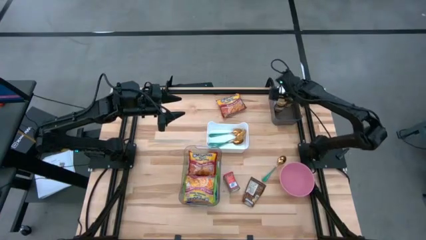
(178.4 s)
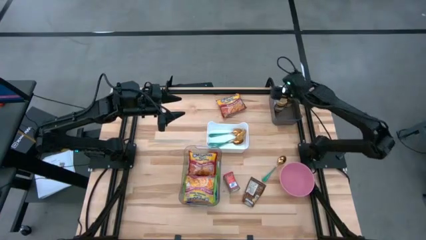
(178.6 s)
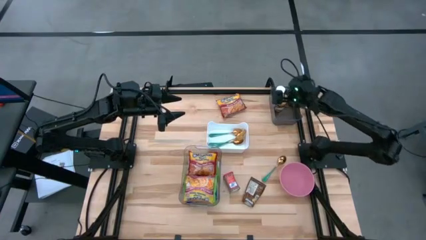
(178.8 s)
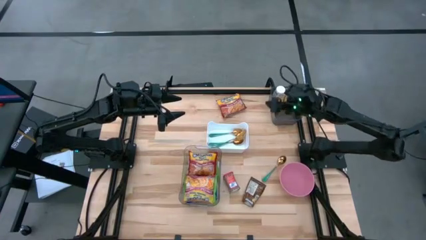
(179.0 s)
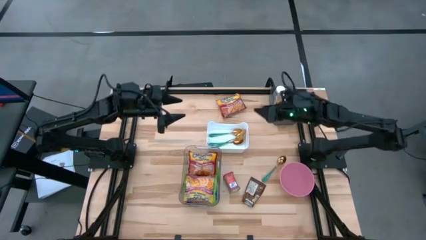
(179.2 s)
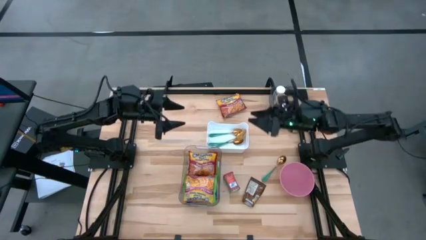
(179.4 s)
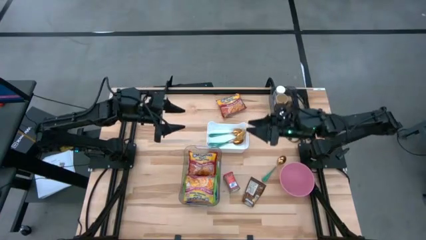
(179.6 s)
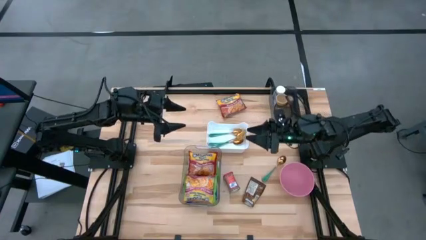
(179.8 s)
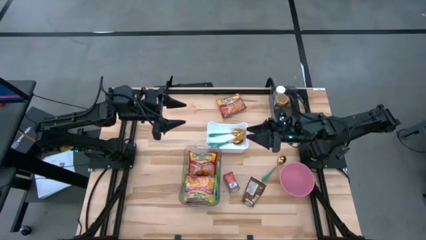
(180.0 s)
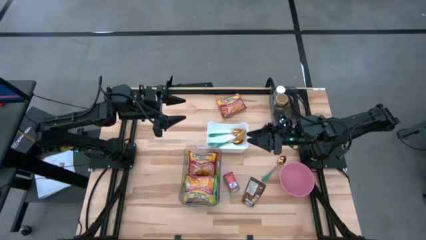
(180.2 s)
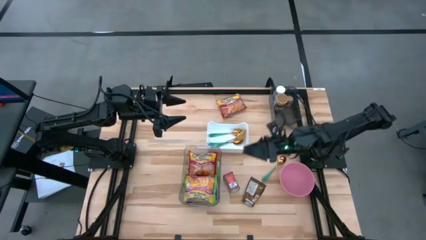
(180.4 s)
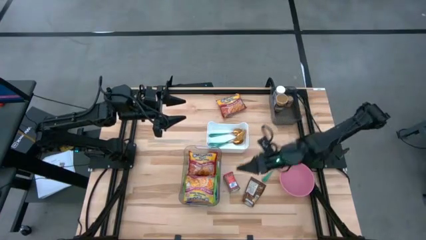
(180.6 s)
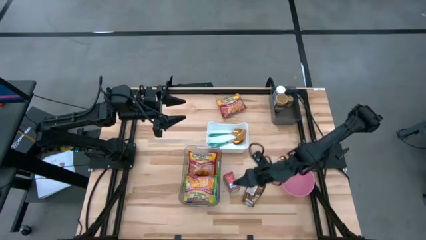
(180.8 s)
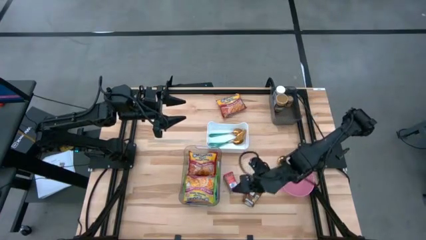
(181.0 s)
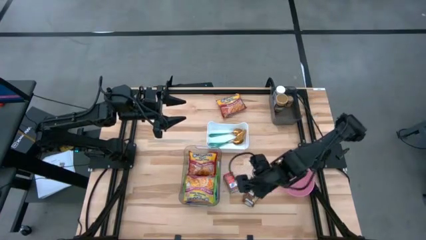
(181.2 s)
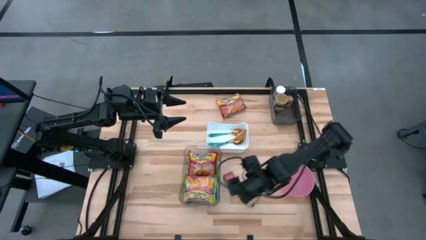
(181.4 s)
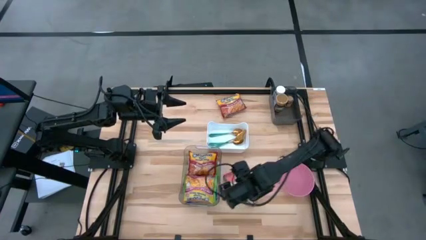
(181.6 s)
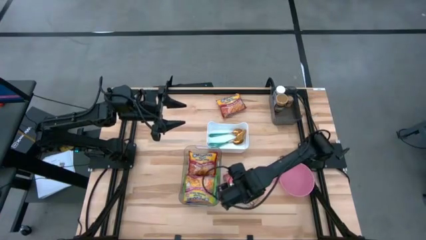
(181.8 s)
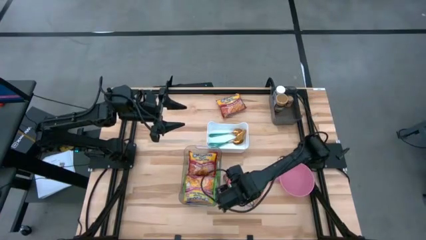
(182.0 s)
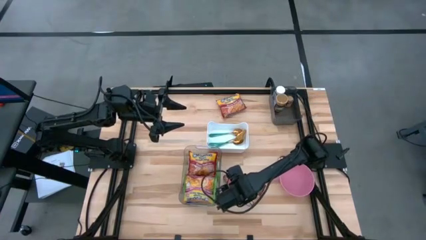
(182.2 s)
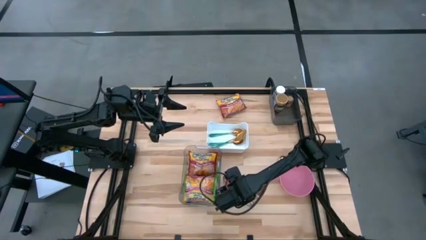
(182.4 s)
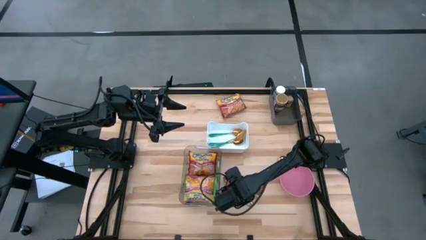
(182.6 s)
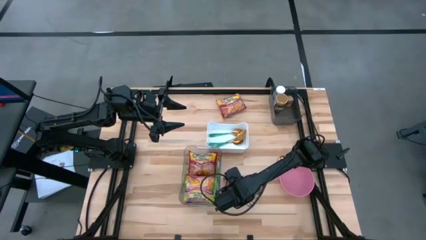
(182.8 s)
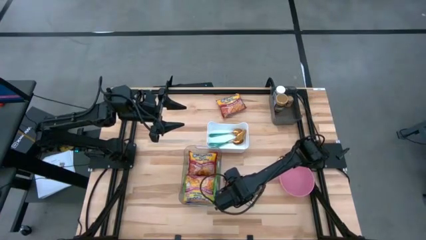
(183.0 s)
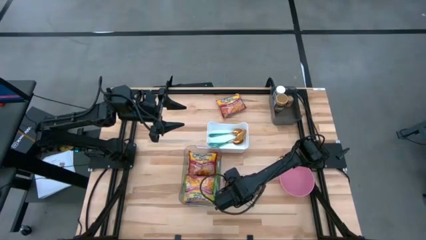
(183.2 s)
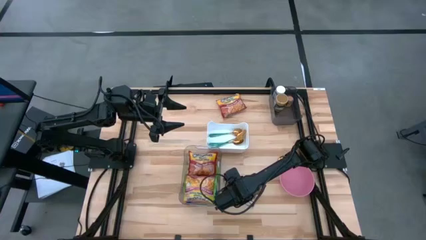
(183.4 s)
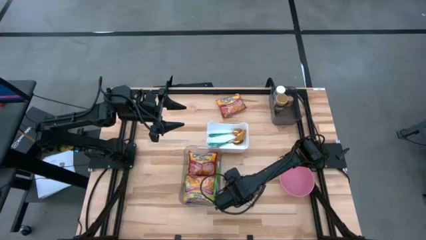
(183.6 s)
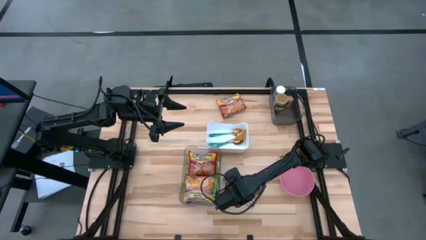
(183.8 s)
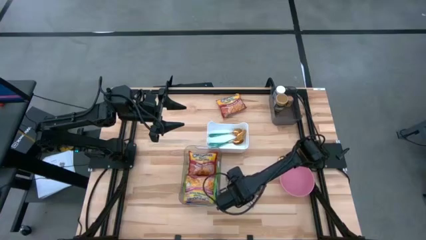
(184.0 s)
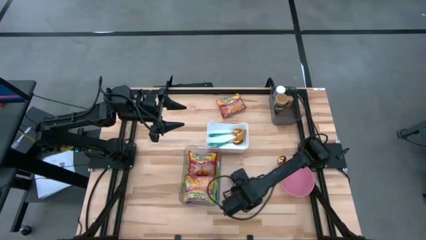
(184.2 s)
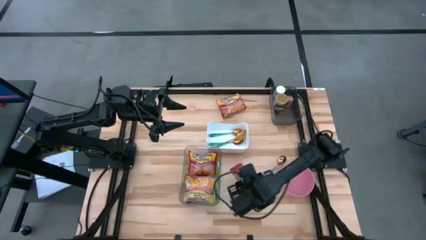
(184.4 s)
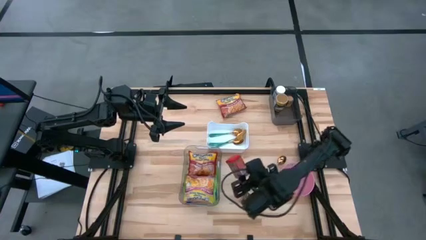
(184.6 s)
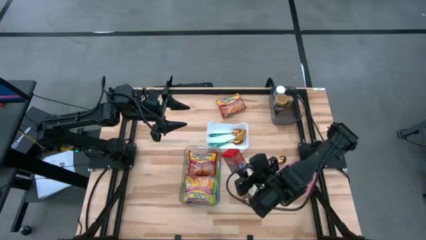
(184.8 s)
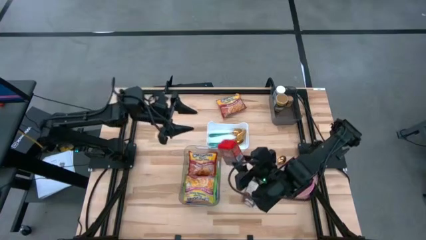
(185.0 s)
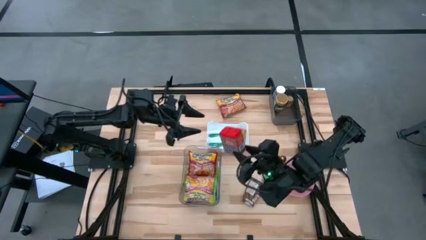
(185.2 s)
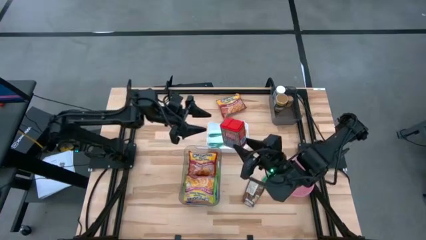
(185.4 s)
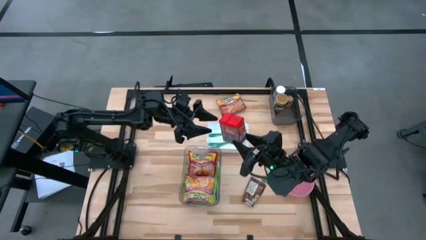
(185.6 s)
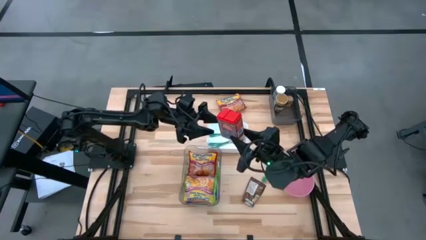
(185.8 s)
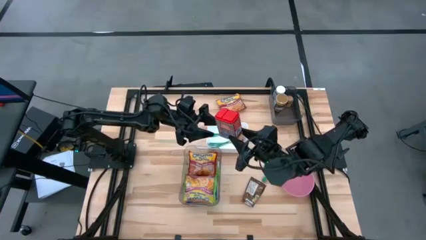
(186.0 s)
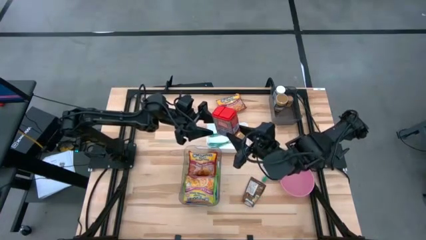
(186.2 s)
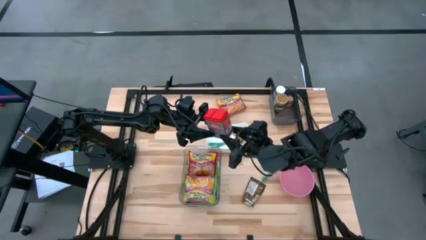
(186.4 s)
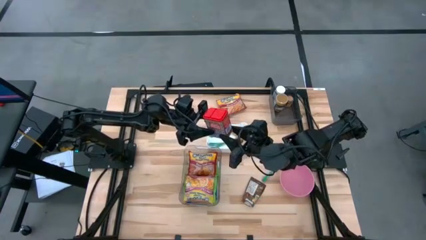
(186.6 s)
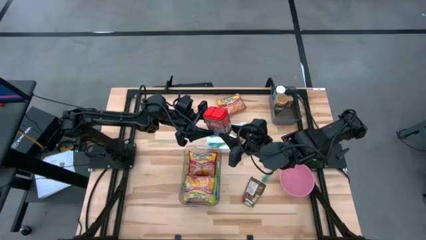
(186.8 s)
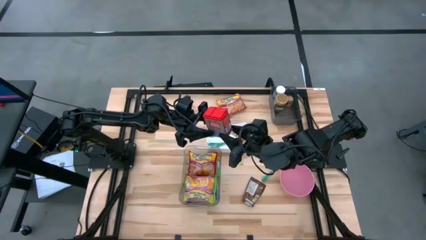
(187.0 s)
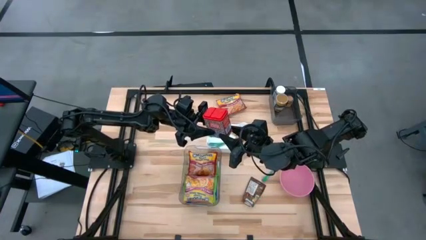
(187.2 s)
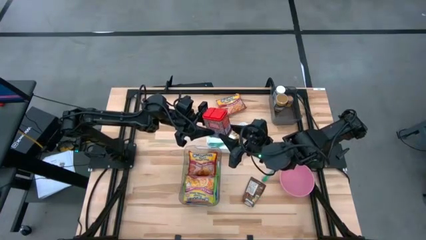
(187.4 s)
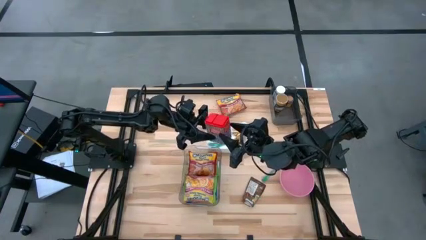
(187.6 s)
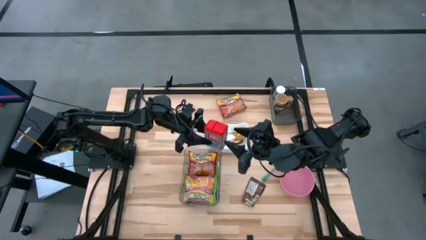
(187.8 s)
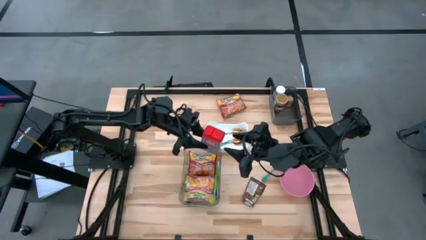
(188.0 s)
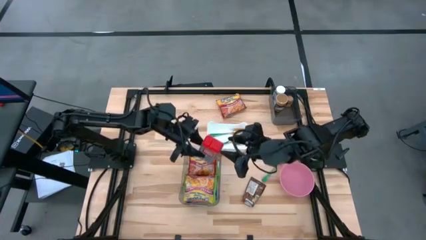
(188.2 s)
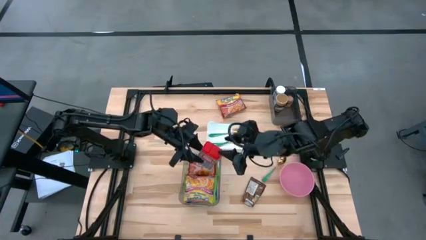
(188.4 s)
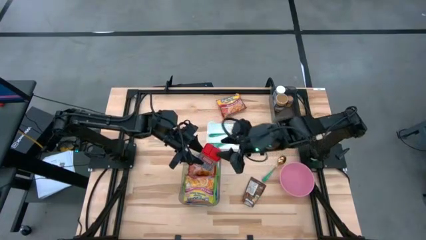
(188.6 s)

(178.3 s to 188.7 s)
Task: Pick & Place Food Item
Put the red spice can into the black bin
